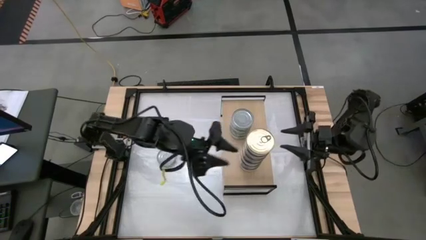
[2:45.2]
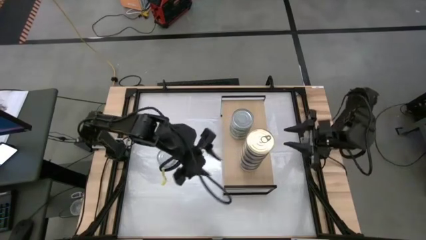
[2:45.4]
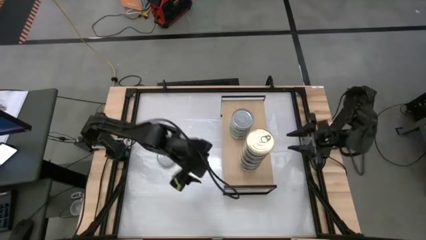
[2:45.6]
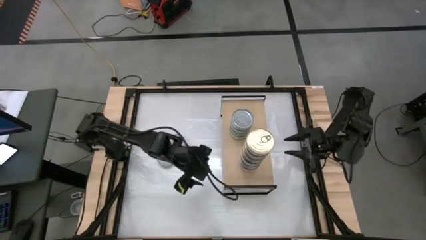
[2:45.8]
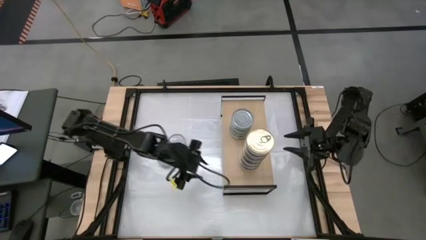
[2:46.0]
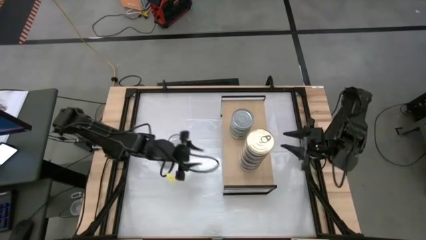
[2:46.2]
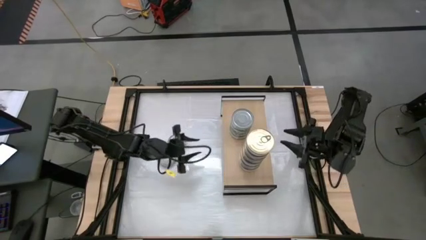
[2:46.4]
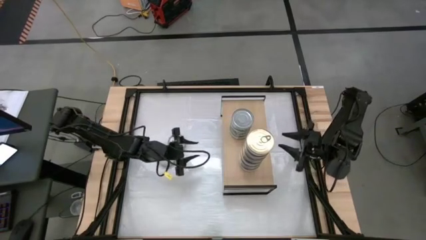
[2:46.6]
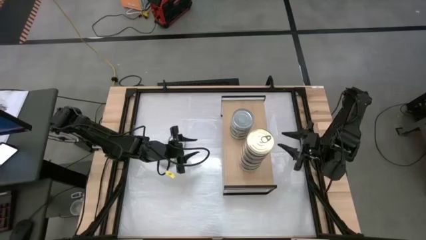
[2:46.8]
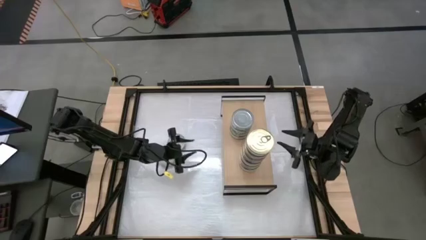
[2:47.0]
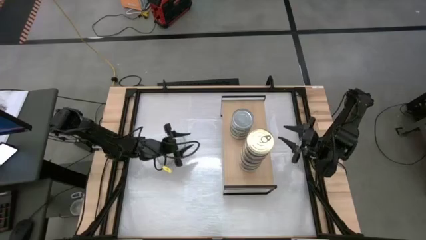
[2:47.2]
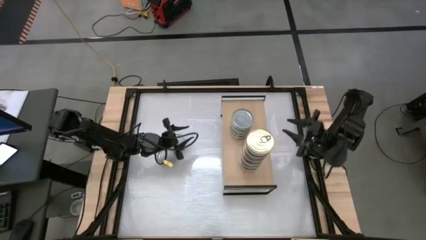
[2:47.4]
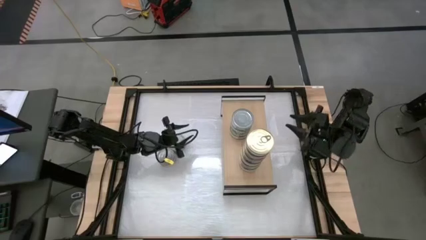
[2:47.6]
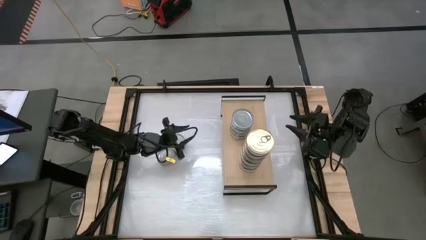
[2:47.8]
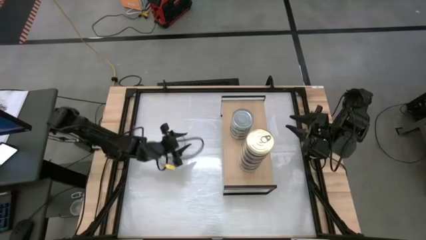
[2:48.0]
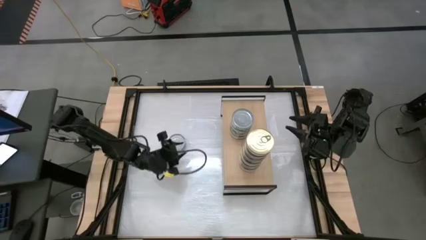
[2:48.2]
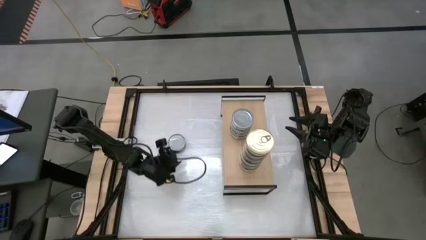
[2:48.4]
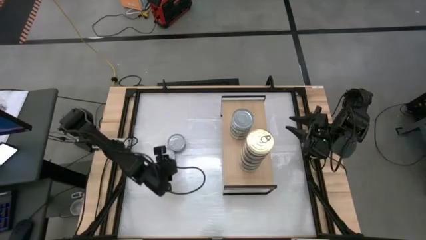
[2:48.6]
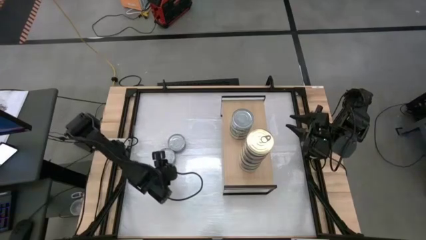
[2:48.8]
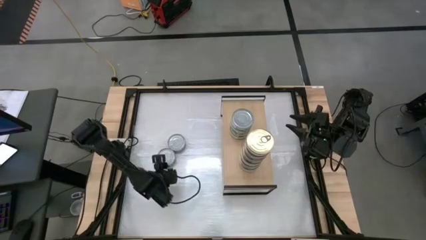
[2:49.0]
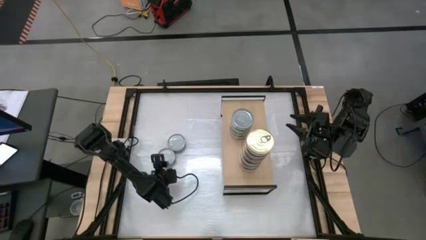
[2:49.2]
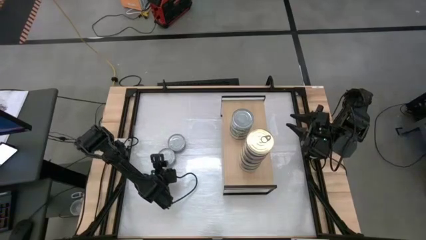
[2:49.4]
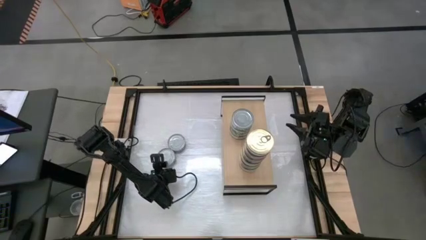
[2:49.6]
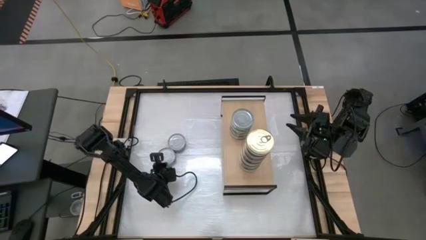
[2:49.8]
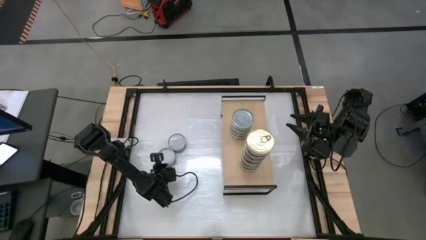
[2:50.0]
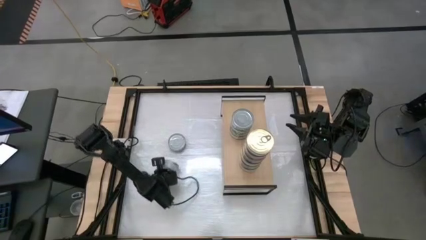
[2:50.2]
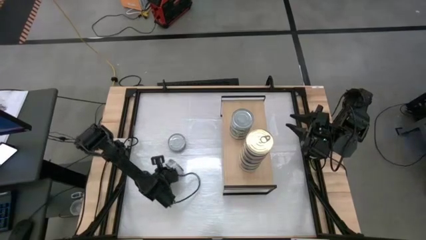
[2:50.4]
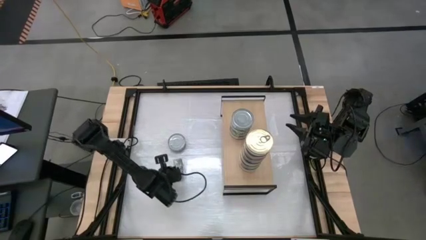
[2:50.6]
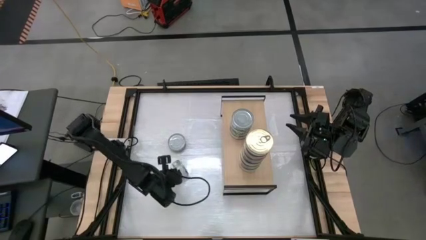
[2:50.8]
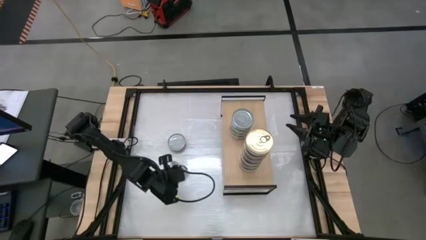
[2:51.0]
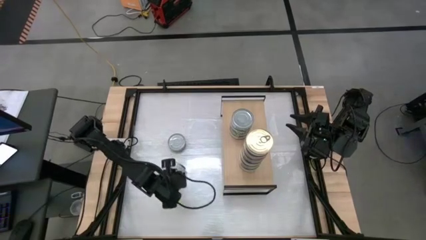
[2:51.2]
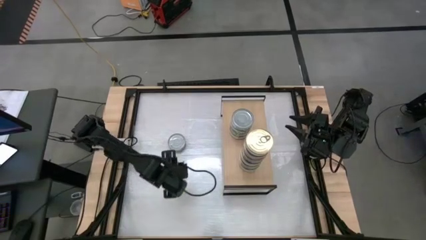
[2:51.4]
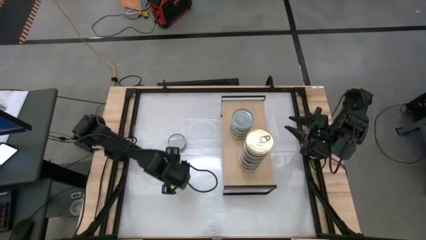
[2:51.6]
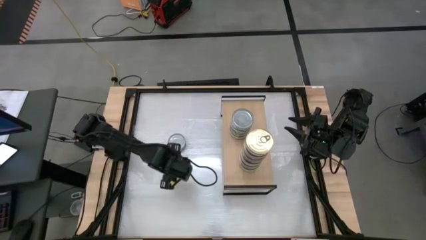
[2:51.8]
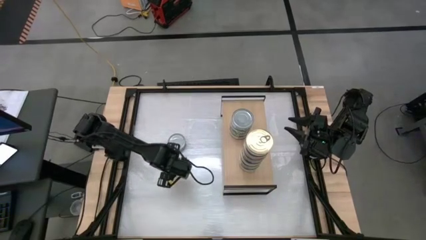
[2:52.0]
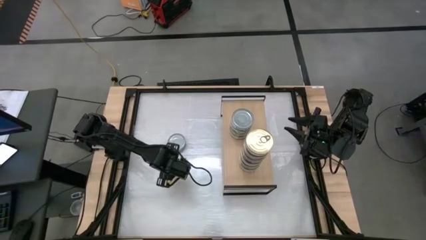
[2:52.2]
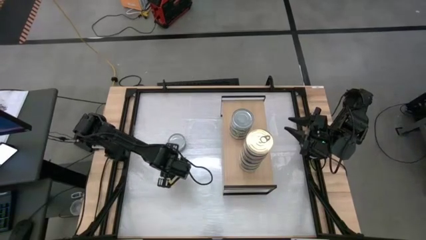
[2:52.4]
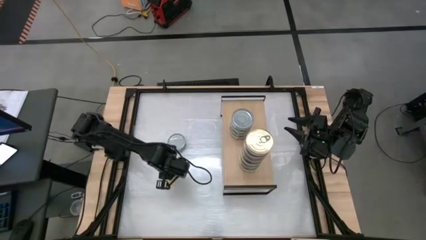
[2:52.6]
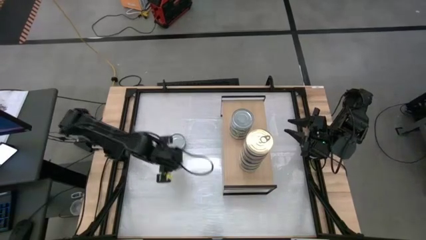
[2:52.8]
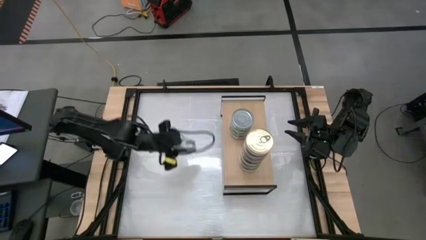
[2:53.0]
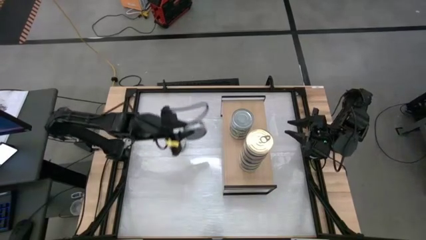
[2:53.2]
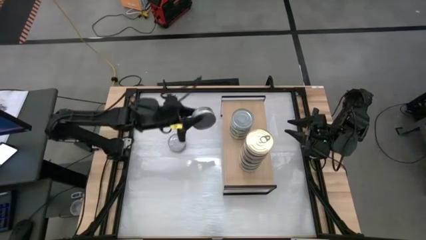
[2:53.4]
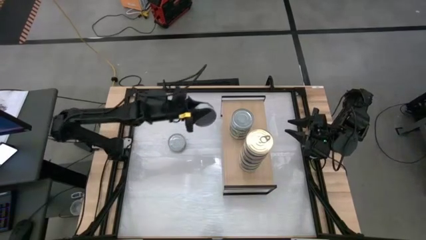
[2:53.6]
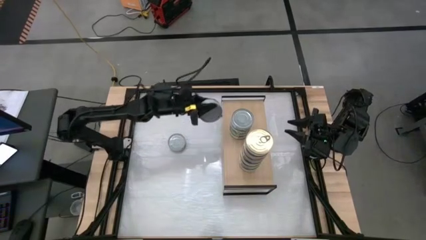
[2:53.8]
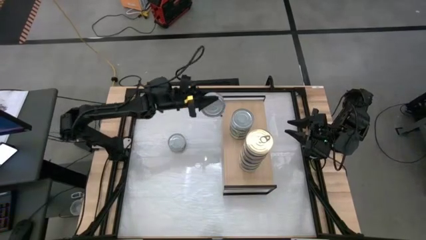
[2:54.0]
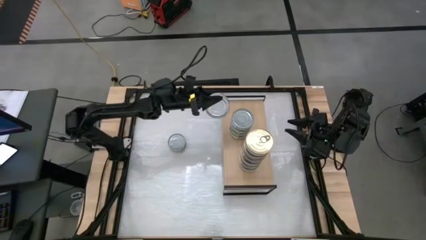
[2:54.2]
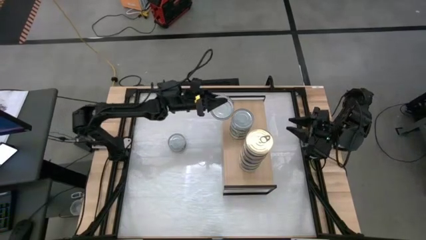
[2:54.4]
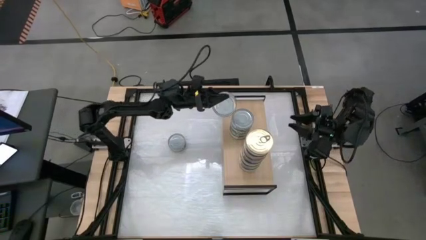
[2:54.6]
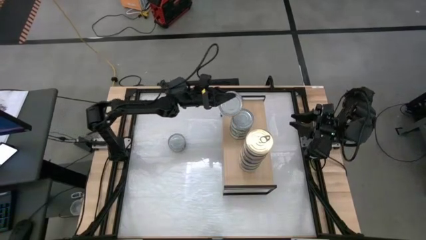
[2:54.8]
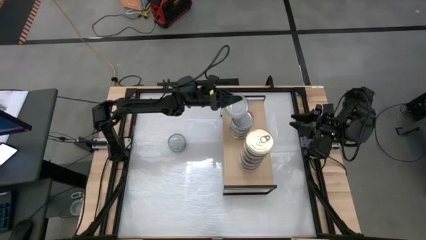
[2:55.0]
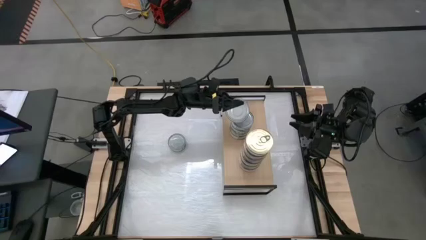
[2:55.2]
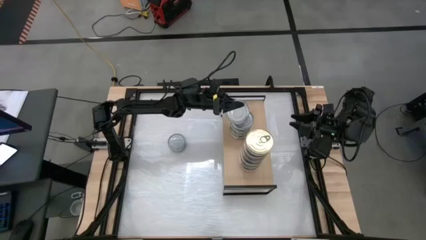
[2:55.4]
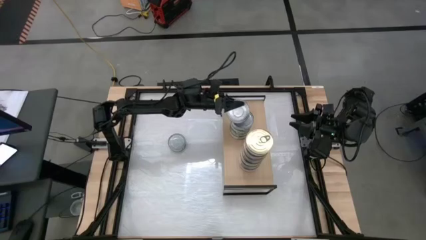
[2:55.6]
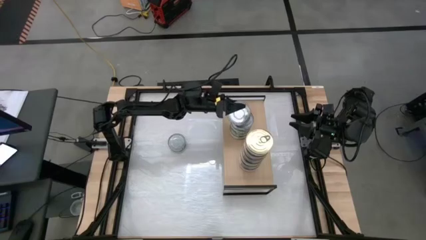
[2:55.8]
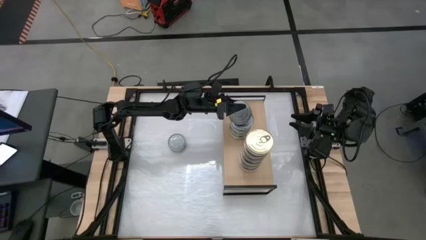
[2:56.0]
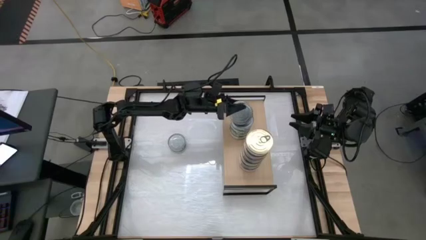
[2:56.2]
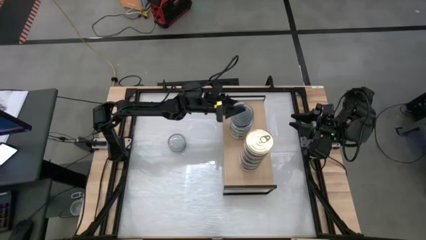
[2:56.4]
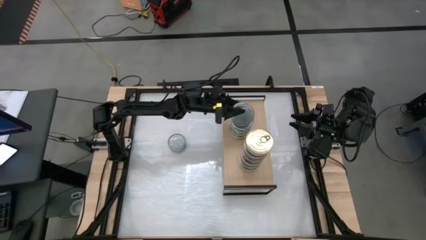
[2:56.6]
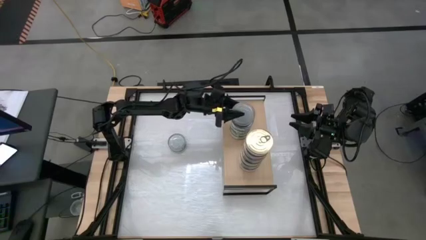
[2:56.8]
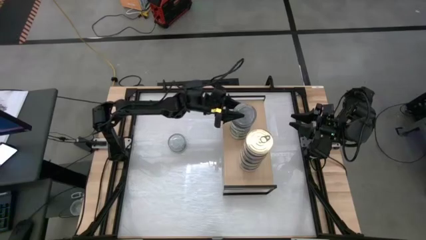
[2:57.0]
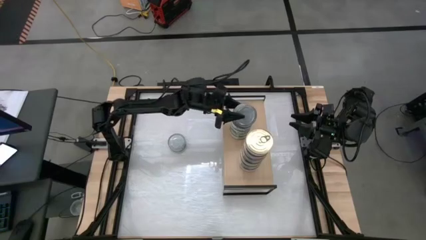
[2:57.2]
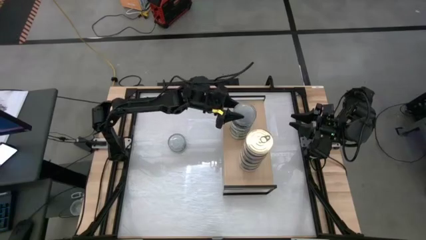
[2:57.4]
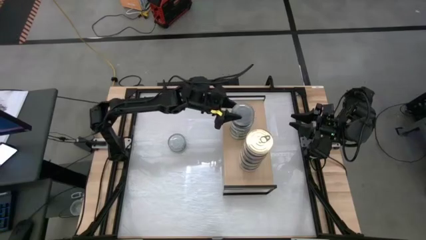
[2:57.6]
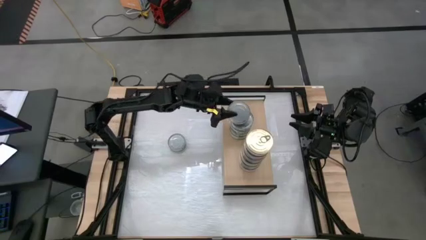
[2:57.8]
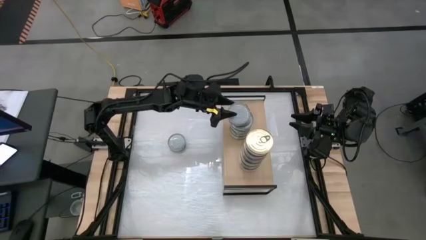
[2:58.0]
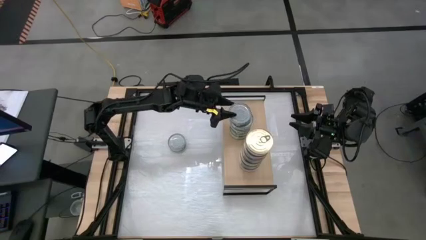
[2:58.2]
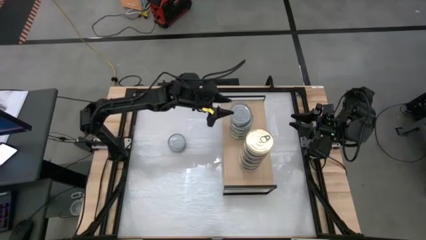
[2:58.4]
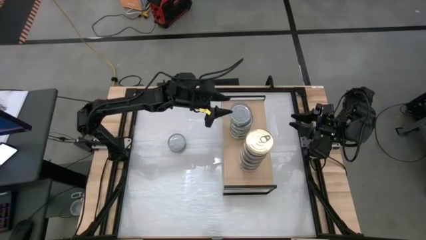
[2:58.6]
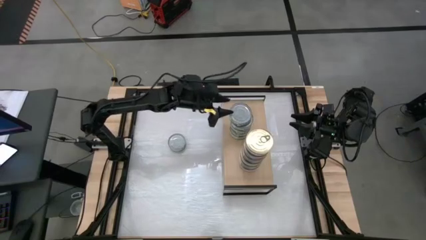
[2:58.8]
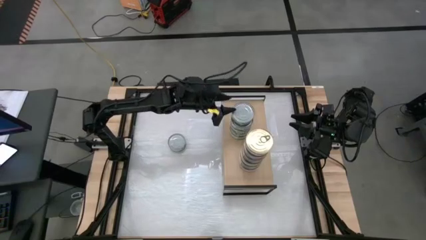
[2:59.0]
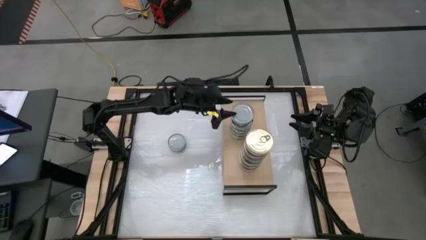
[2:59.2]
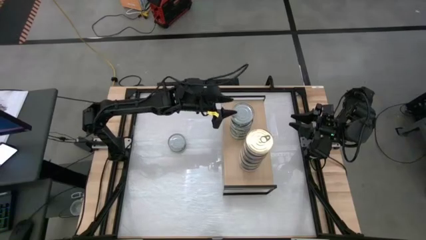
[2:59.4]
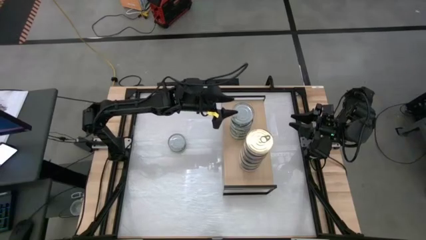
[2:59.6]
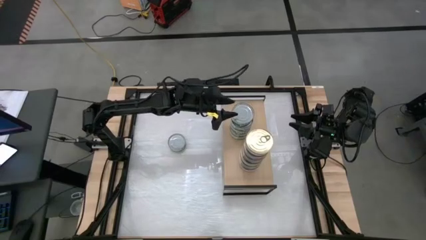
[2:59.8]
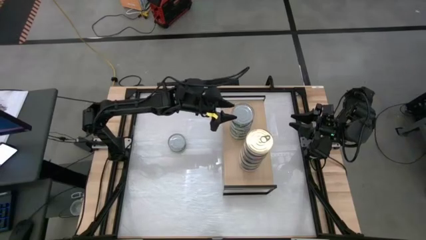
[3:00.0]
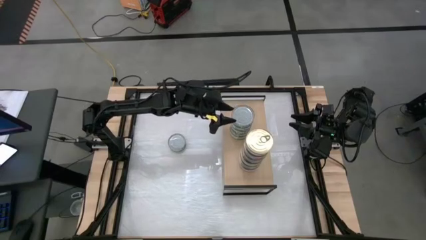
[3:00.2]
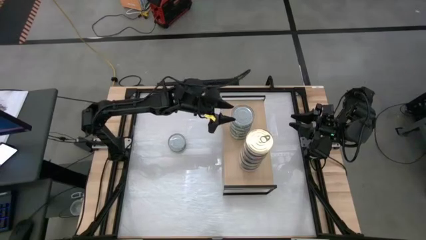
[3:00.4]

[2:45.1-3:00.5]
Task: Stack canned seafood by type on shelf
Stack the green tuna can on top of the green tuna can
